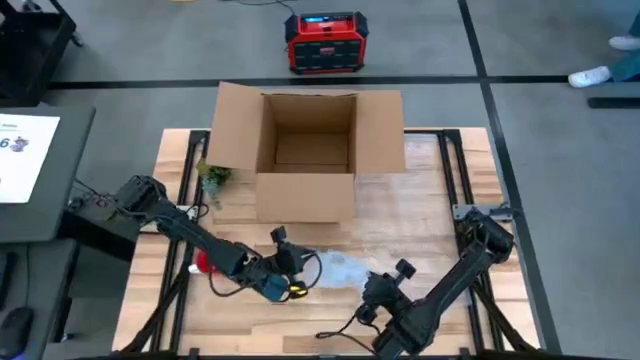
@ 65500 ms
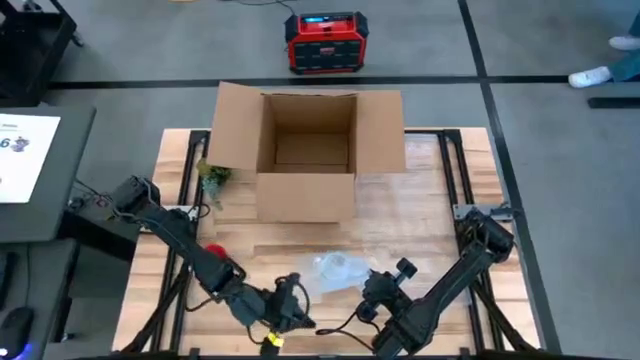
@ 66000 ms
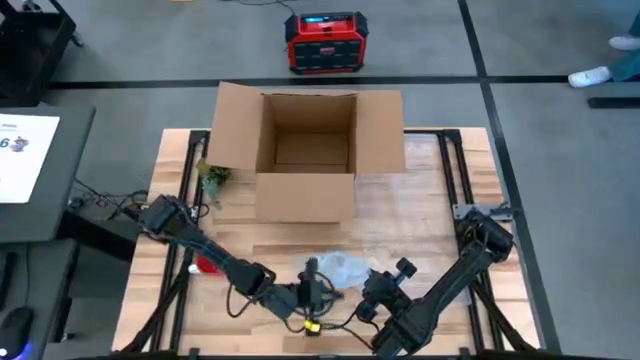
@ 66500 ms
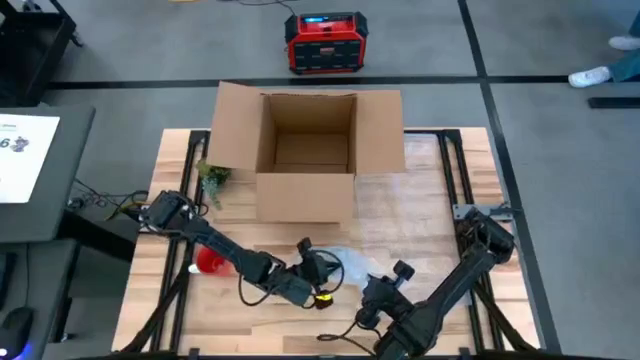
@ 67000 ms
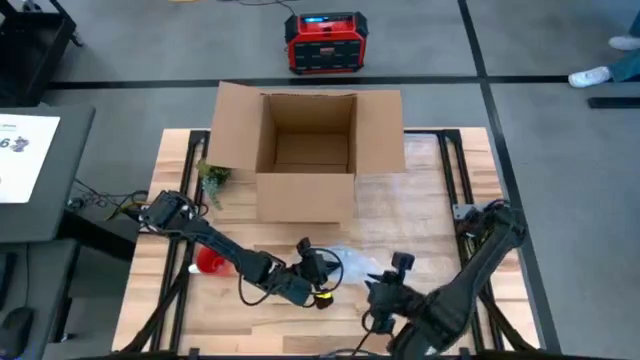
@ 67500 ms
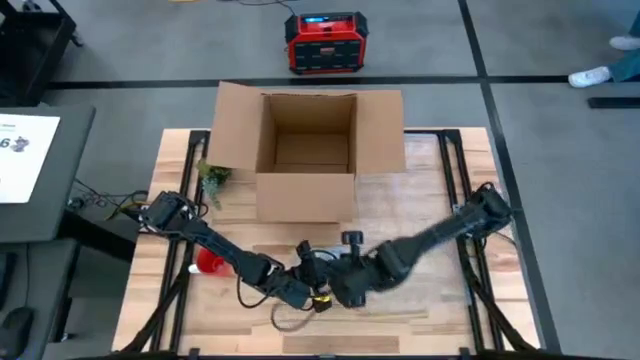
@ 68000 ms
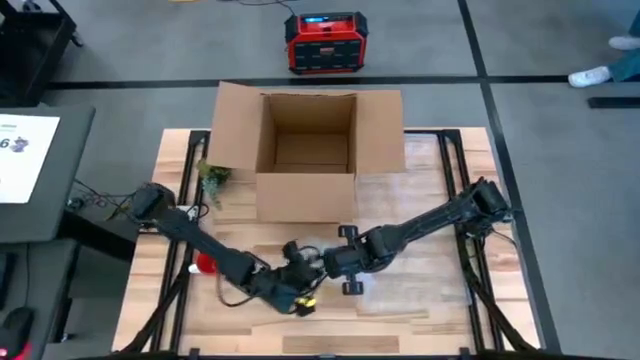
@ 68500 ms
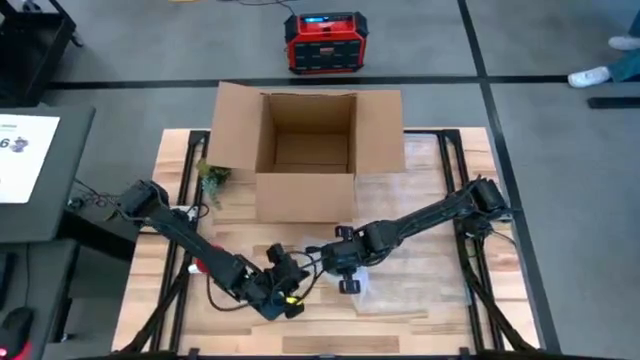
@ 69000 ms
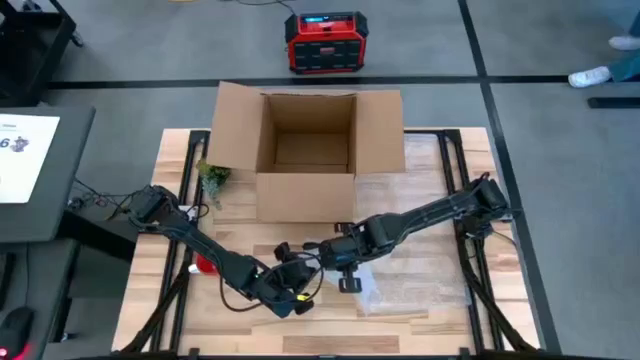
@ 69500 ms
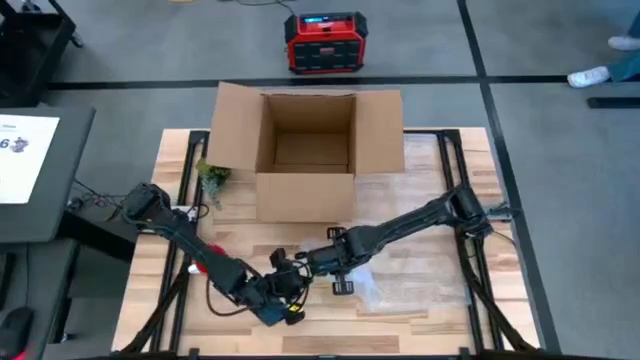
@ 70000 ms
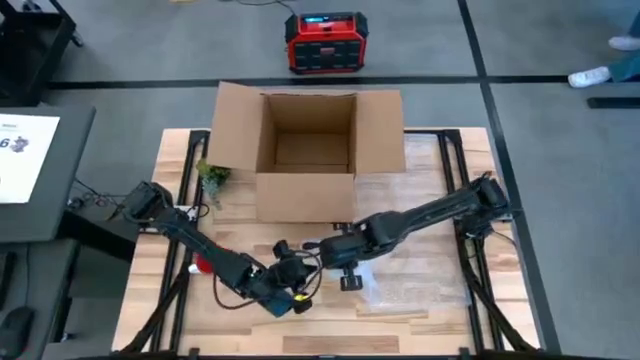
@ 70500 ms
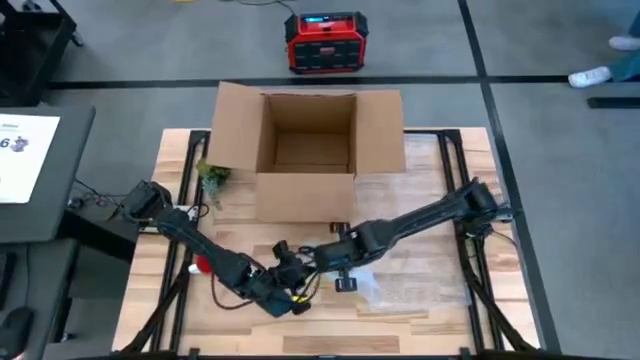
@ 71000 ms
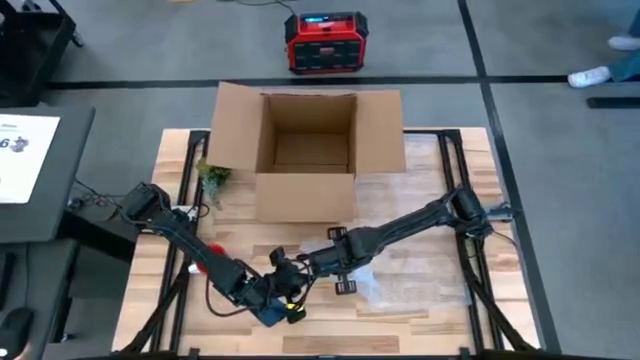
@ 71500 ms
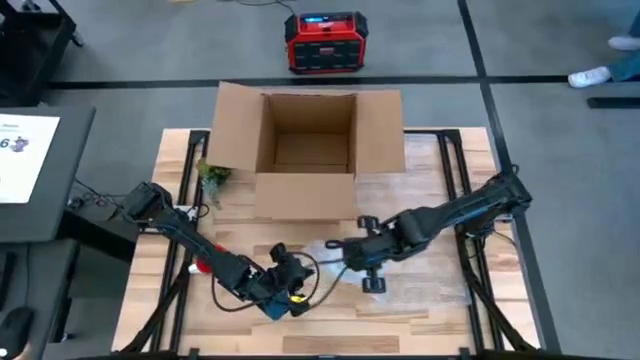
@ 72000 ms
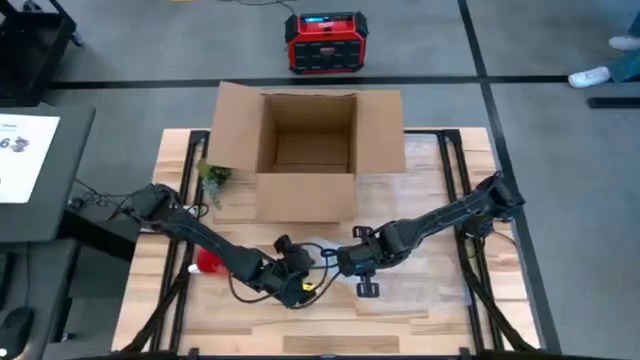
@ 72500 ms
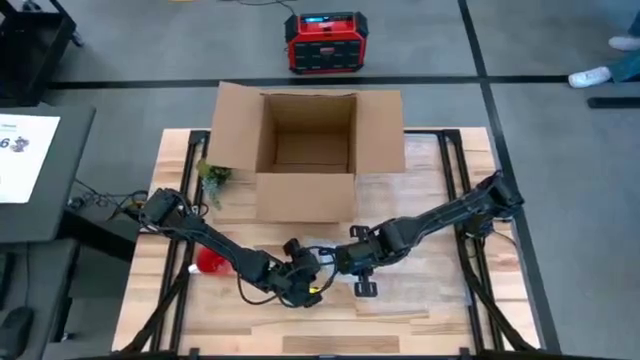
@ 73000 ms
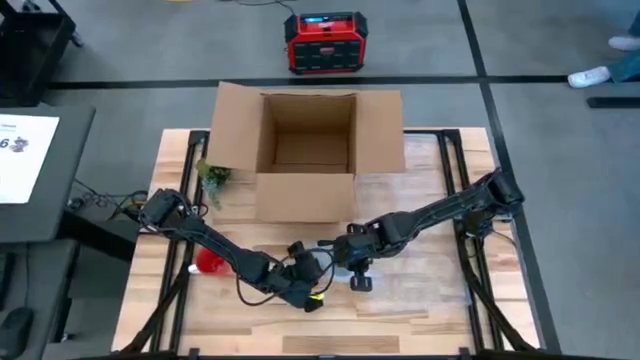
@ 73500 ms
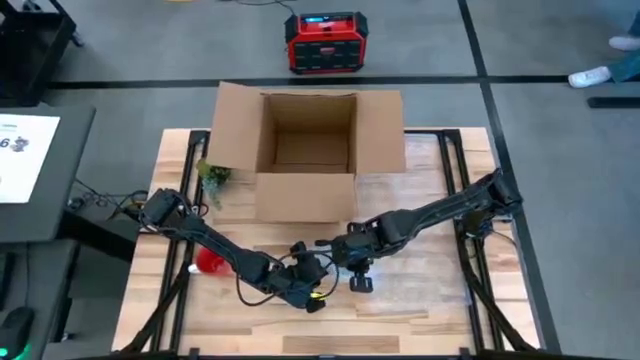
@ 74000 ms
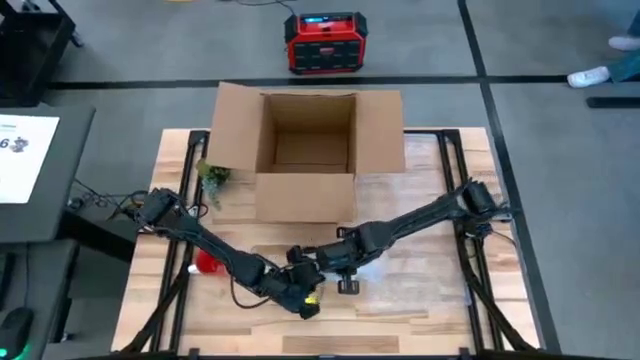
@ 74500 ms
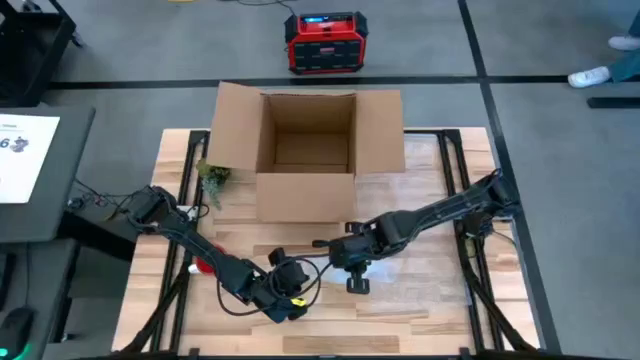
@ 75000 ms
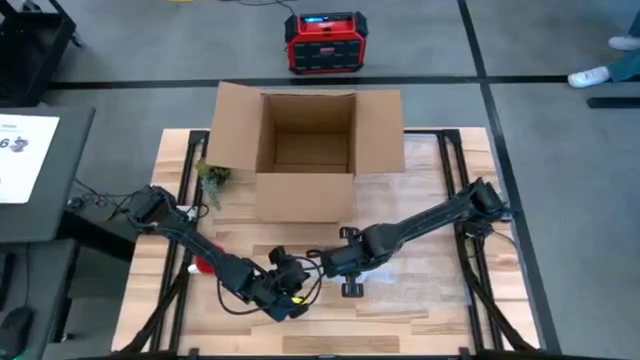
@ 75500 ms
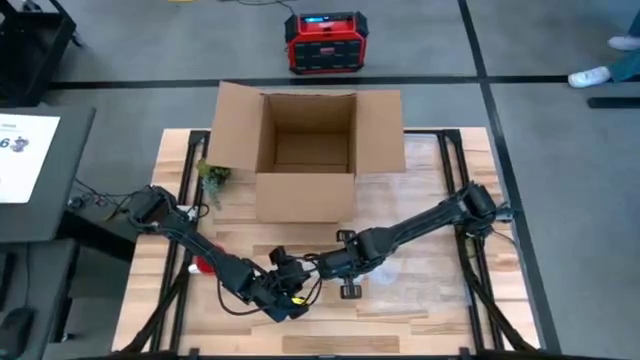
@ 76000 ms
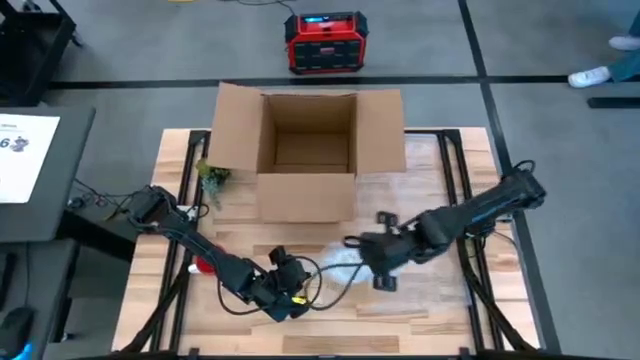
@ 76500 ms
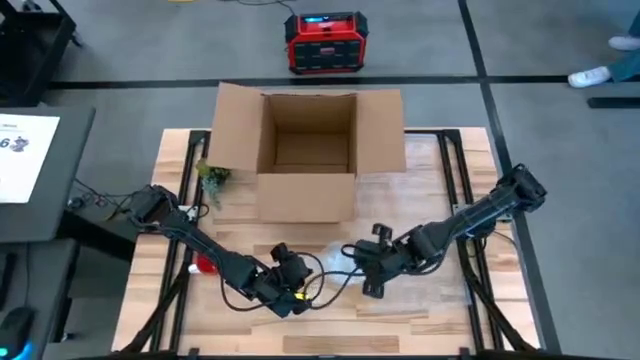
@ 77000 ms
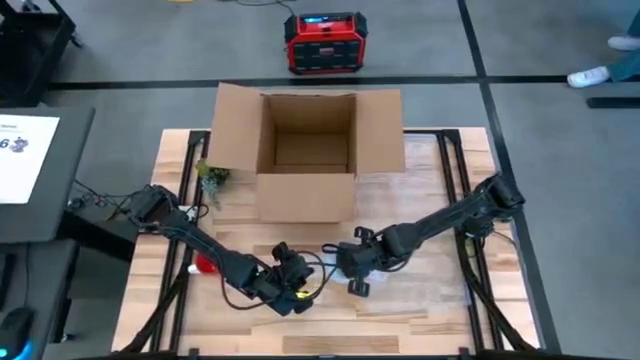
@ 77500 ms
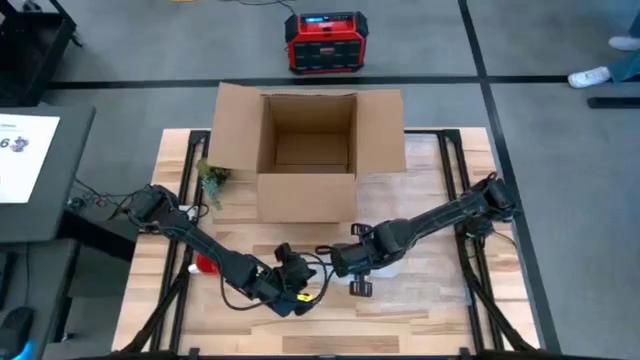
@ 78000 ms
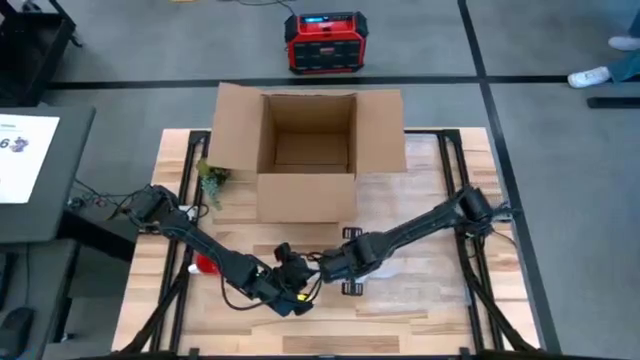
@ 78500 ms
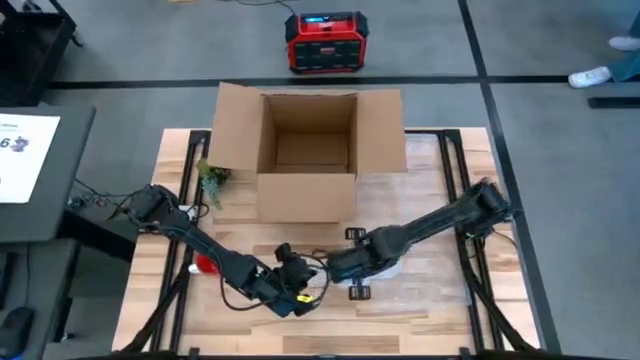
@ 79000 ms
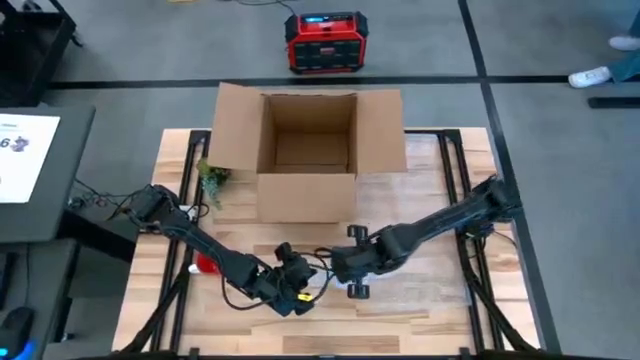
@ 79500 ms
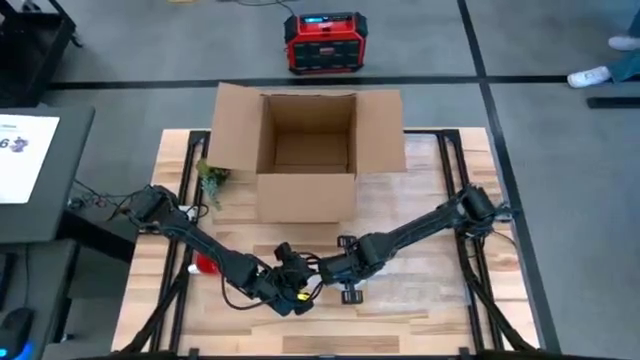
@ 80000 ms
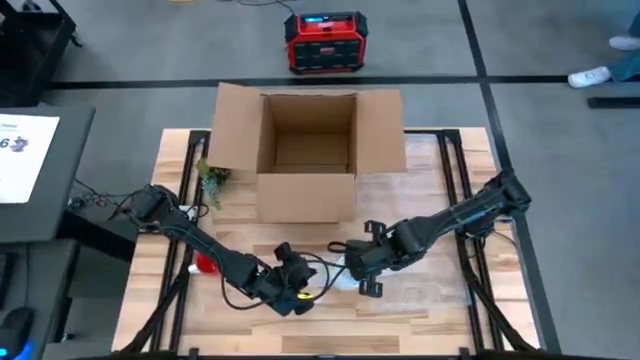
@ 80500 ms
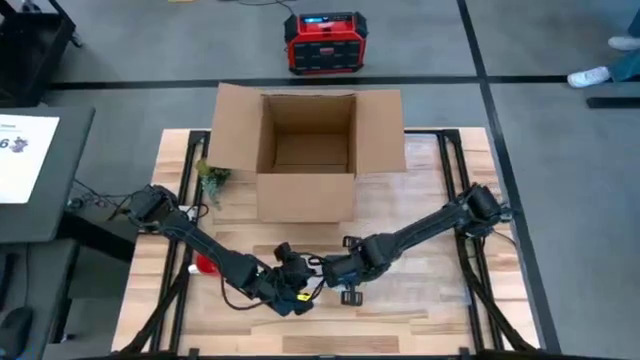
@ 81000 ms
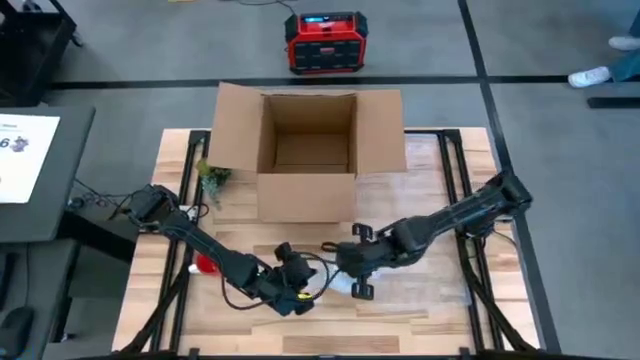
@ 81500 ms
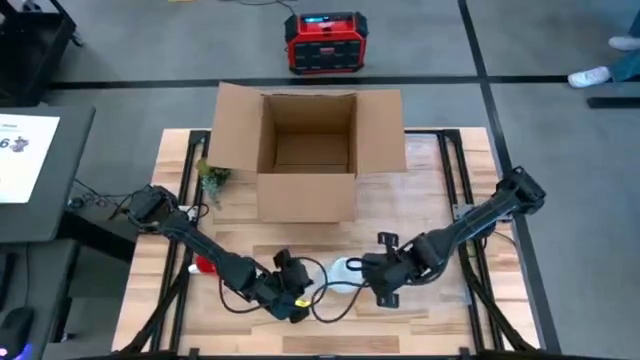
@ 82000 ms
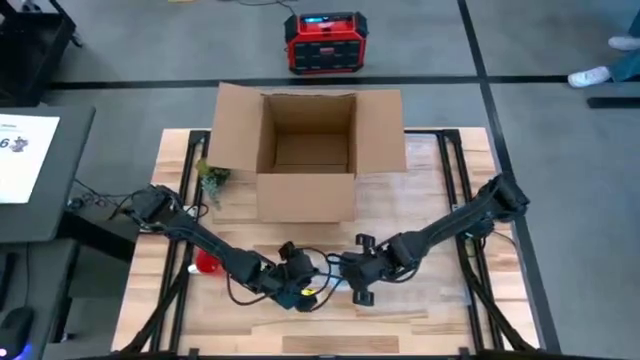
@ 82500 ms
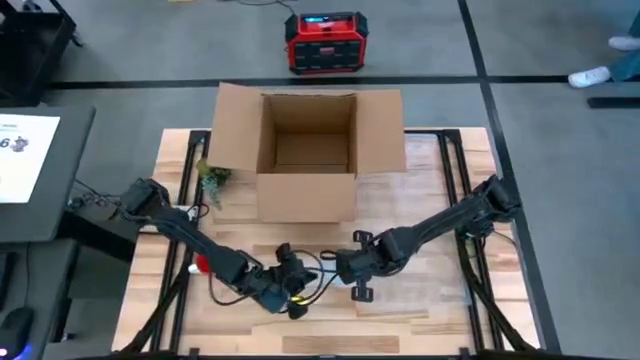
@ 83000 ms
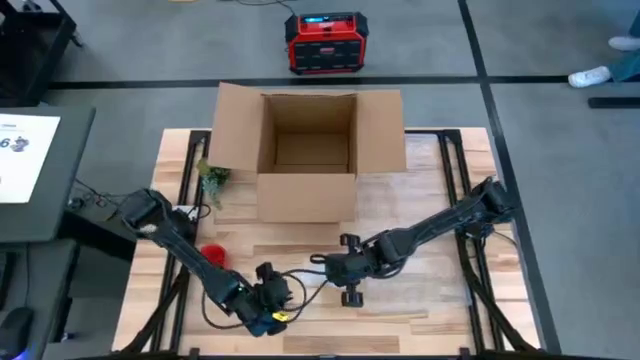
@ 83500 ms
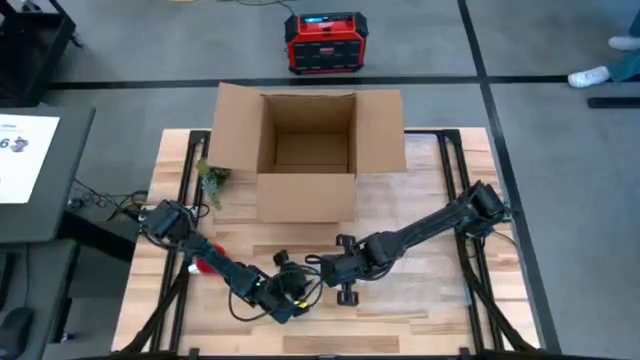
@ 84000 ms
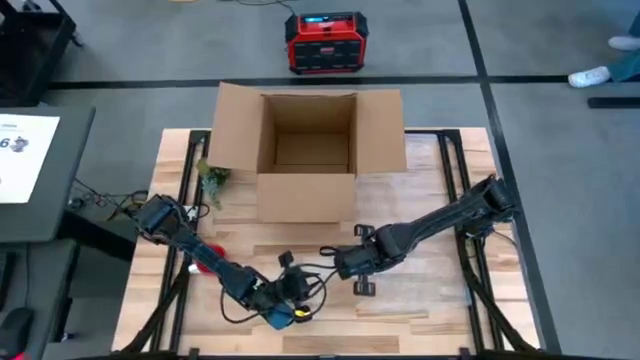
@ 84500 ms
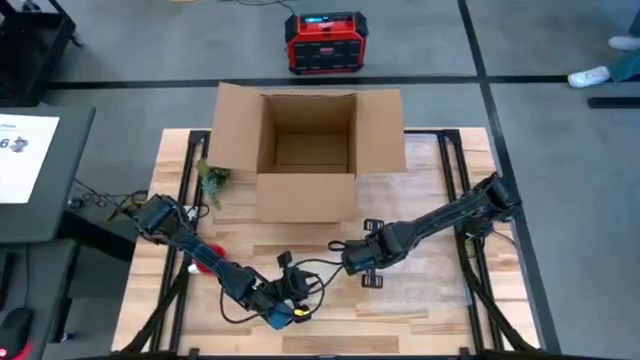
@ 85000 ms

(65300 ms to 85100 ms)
Task: wrap mug
Pack the white mug with the bubble wrap

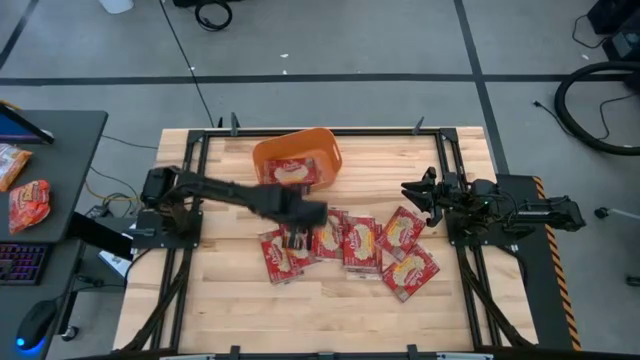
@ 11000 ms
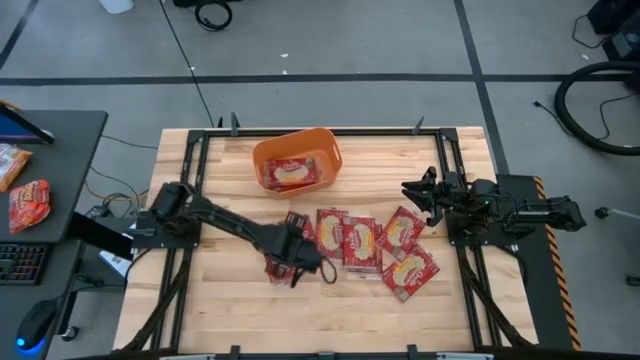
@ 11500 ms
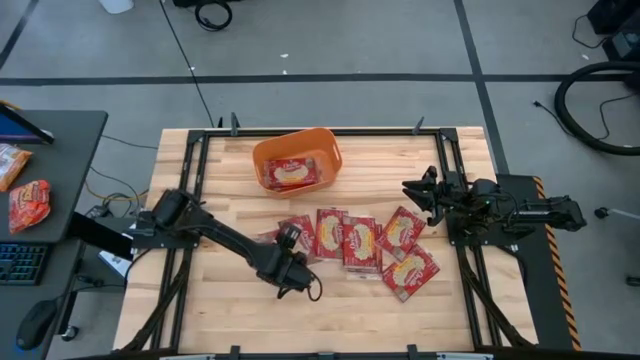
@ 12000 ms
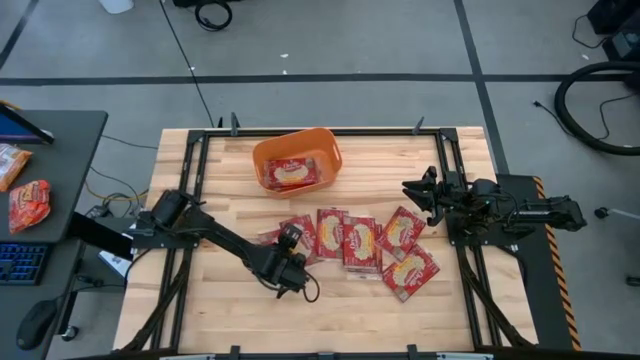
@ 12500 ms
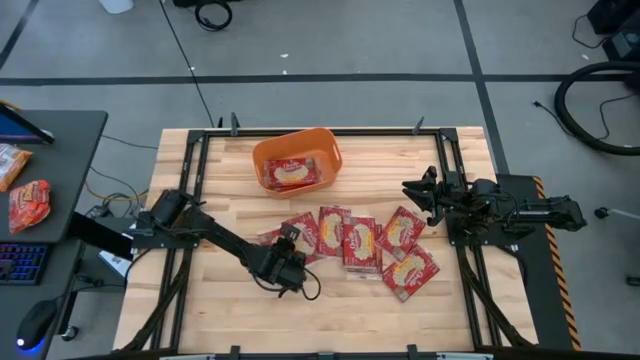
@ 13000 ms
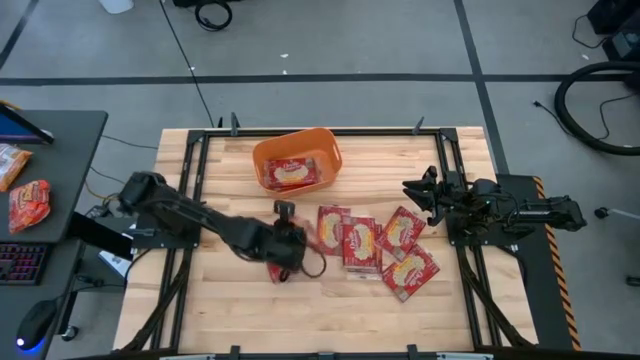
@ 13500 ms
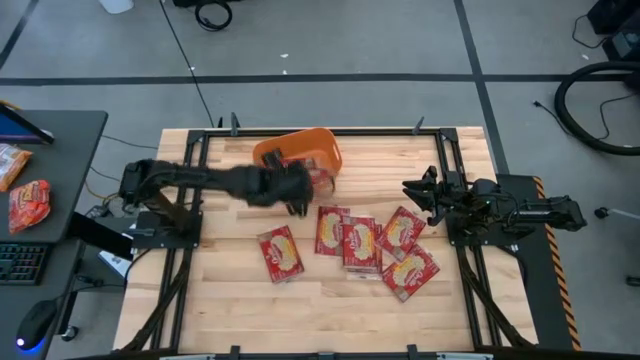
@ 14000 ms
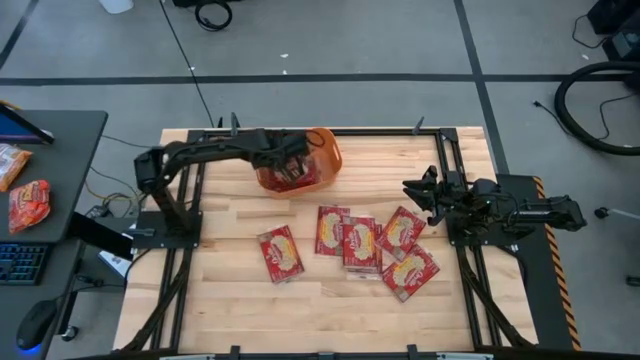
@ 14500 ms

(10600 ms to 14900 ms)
Task: Sort popcorn bags into baskets
Put the red popcorn bag into the orange bin
